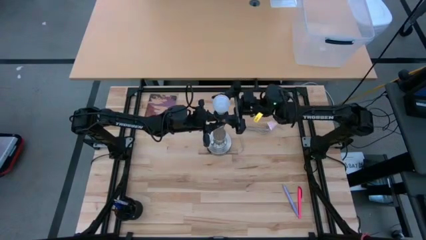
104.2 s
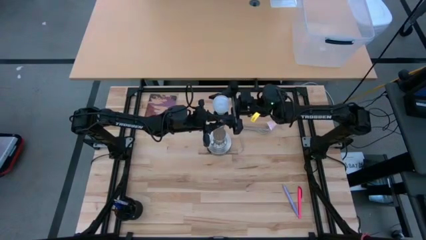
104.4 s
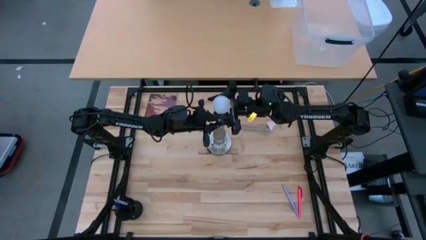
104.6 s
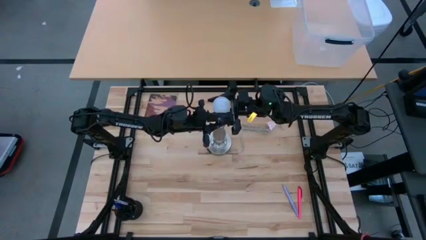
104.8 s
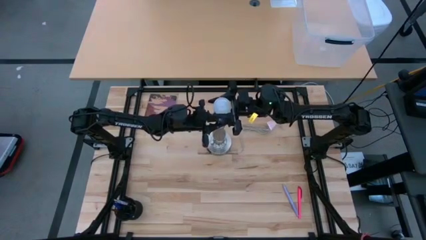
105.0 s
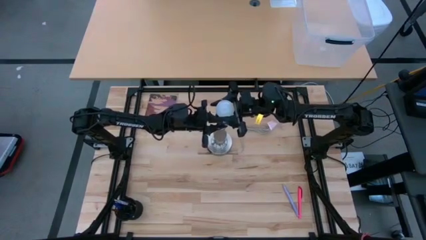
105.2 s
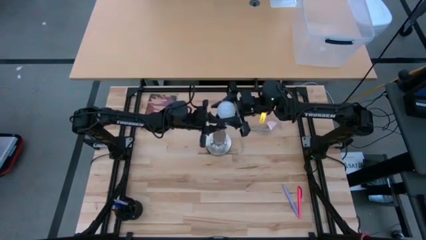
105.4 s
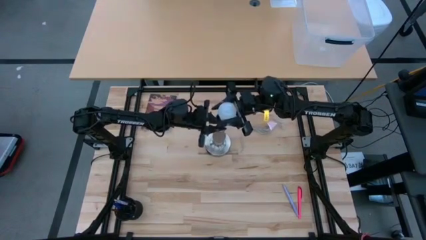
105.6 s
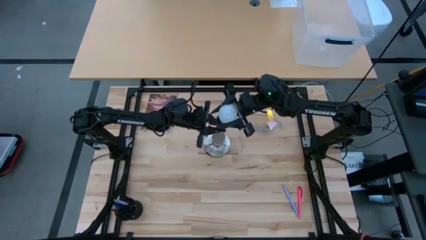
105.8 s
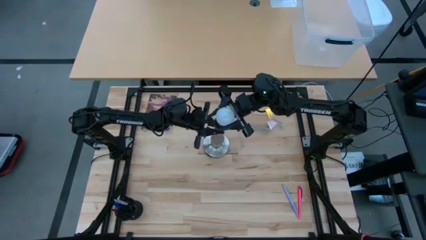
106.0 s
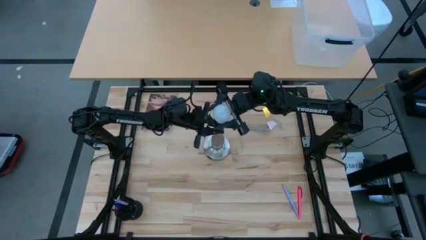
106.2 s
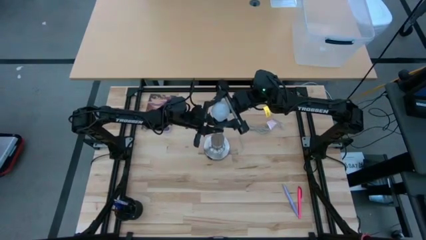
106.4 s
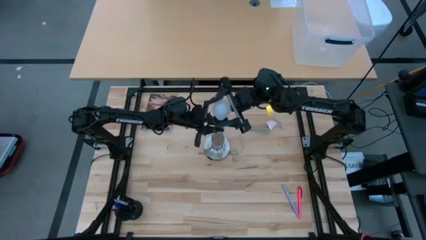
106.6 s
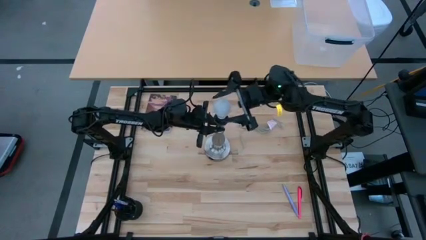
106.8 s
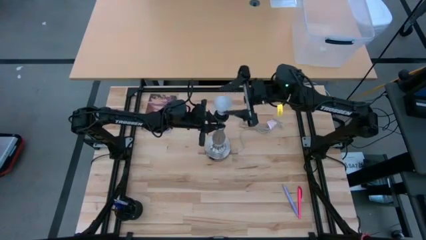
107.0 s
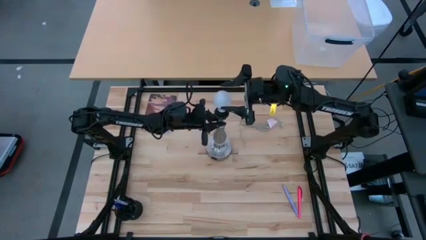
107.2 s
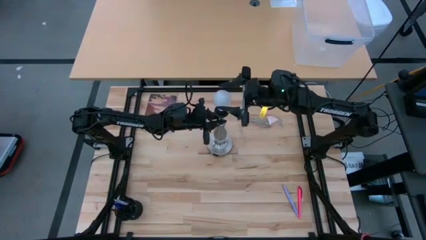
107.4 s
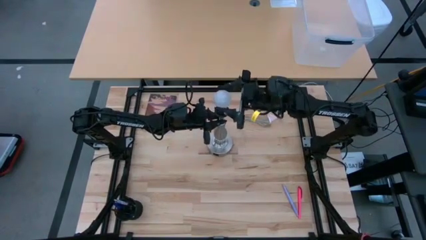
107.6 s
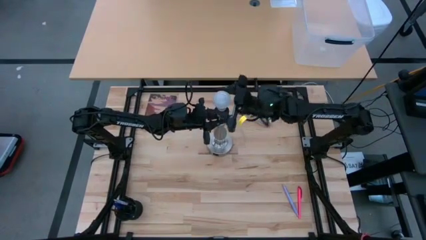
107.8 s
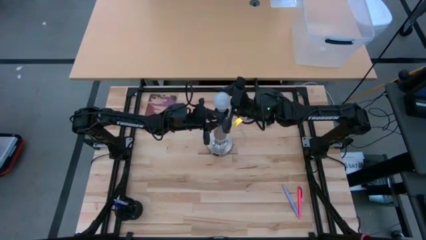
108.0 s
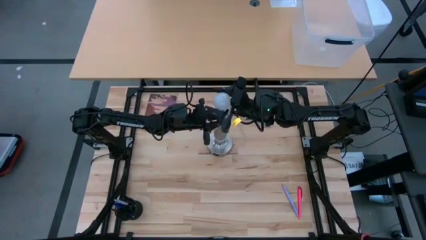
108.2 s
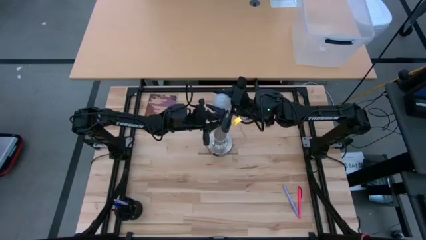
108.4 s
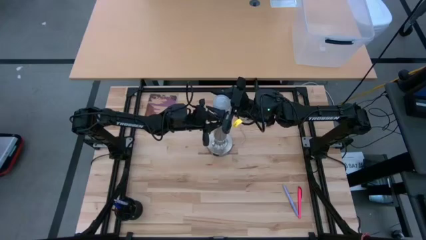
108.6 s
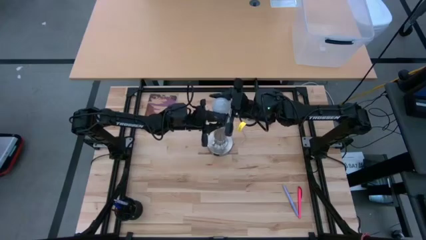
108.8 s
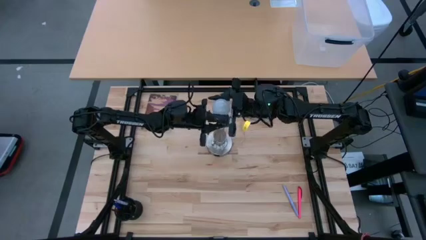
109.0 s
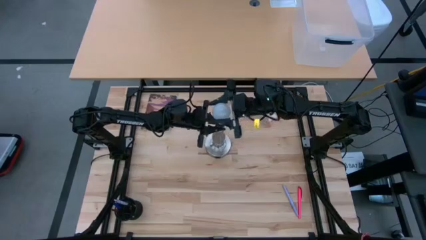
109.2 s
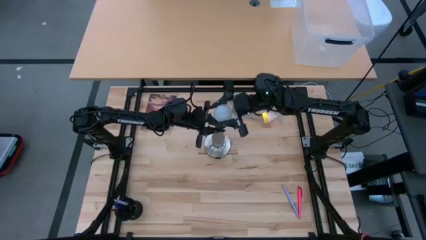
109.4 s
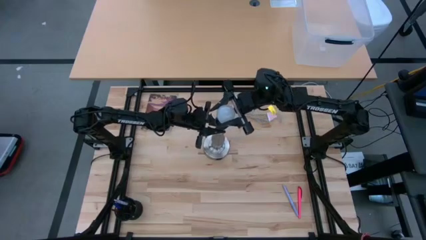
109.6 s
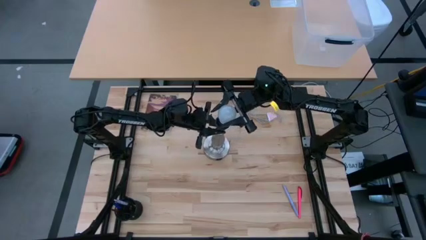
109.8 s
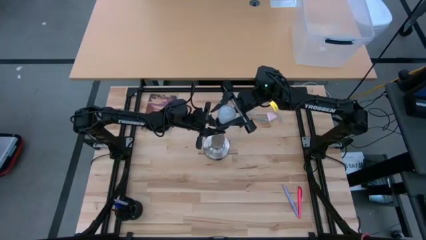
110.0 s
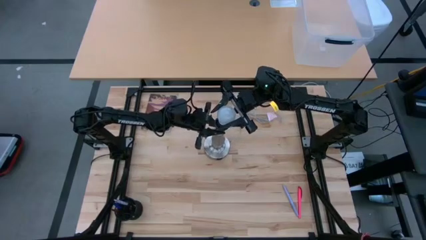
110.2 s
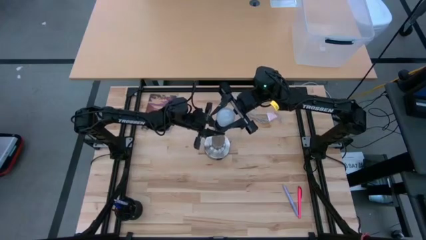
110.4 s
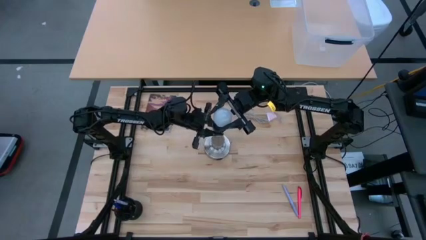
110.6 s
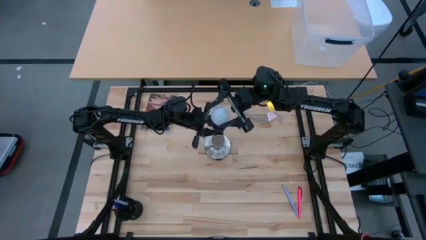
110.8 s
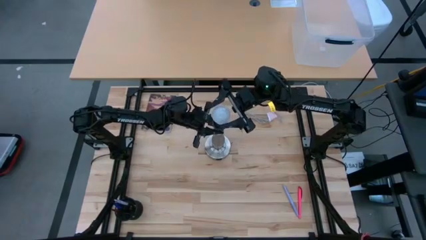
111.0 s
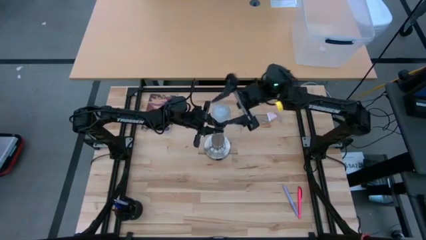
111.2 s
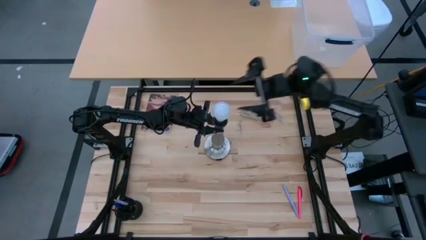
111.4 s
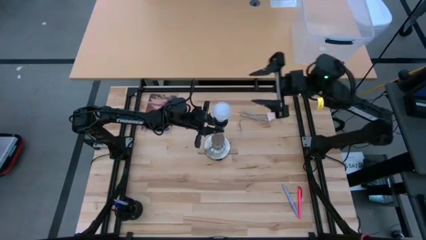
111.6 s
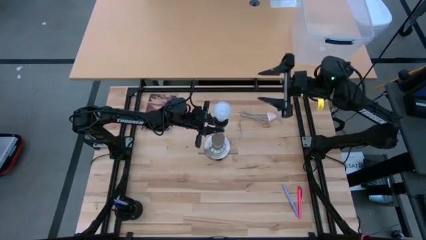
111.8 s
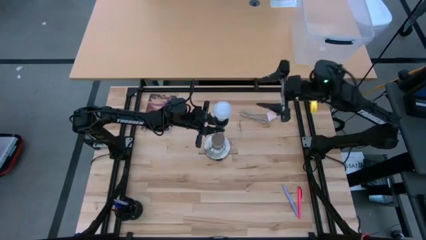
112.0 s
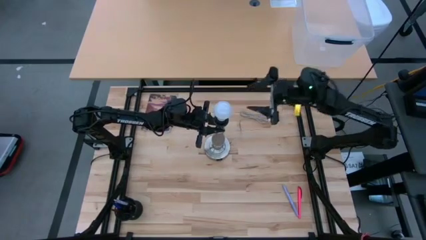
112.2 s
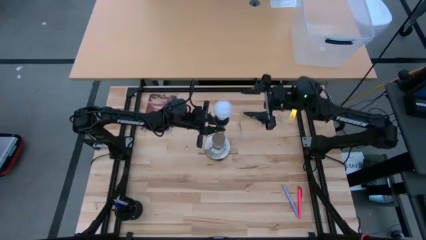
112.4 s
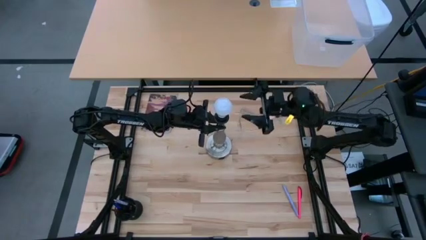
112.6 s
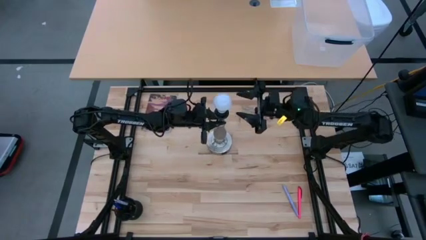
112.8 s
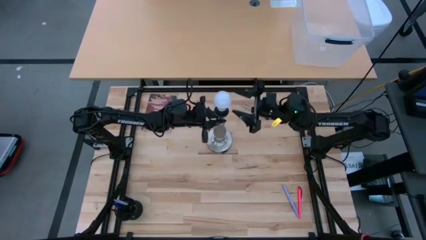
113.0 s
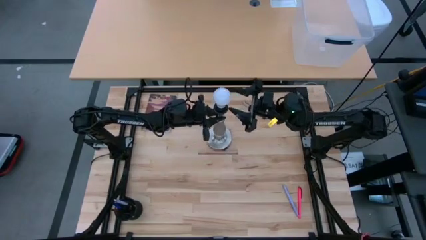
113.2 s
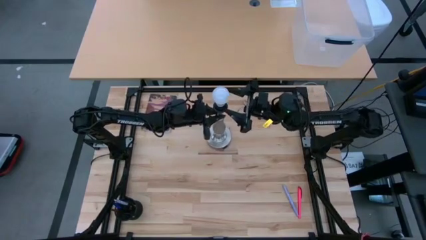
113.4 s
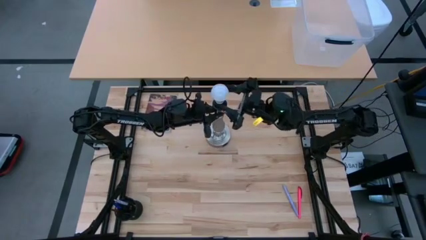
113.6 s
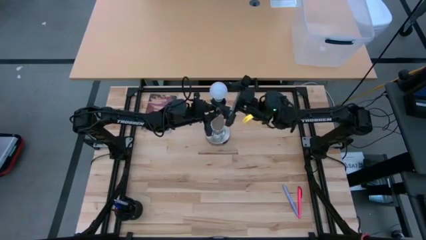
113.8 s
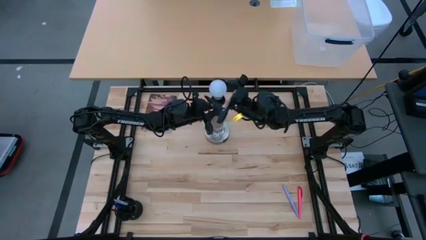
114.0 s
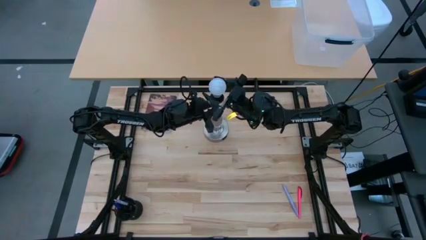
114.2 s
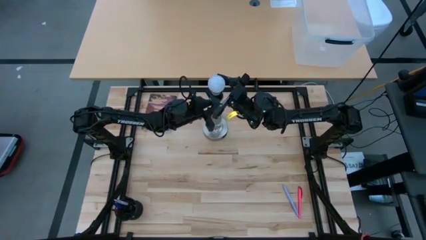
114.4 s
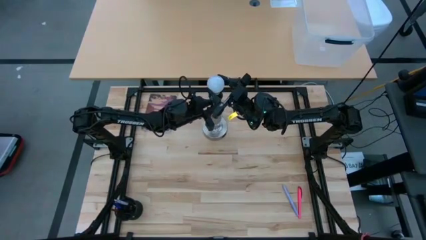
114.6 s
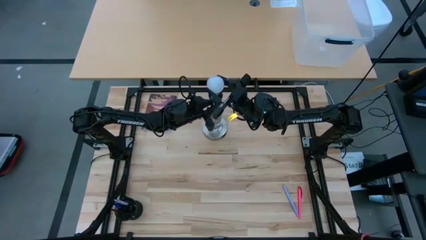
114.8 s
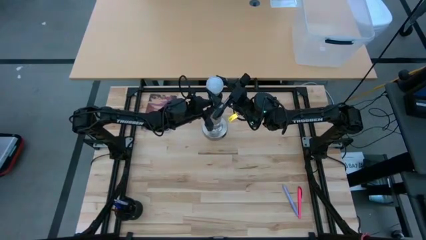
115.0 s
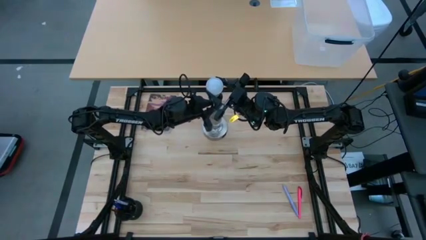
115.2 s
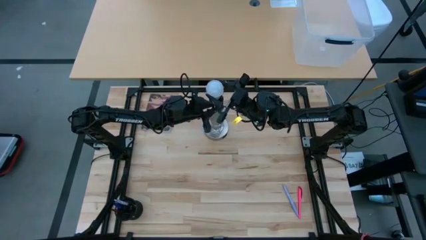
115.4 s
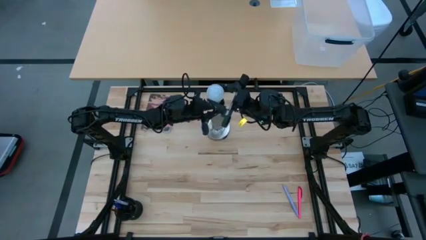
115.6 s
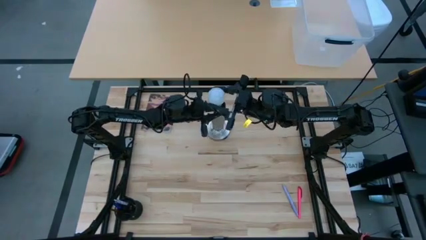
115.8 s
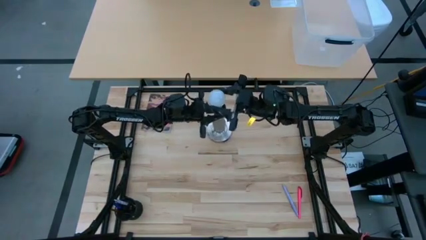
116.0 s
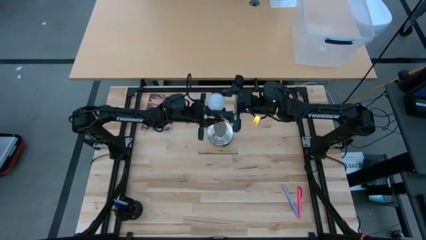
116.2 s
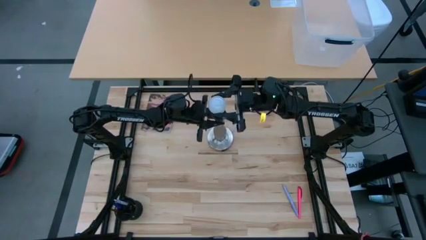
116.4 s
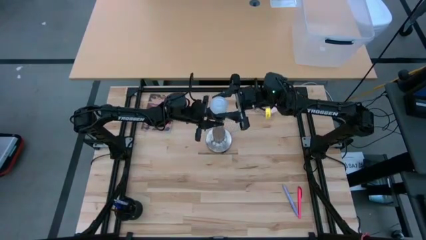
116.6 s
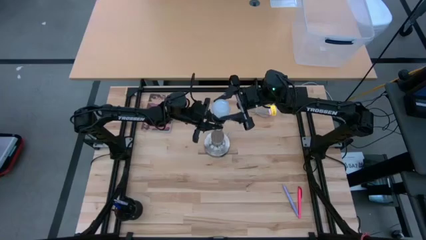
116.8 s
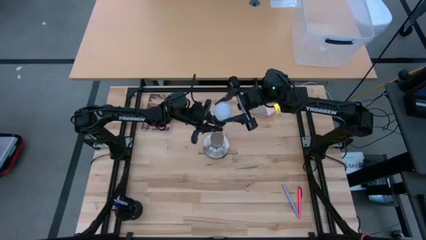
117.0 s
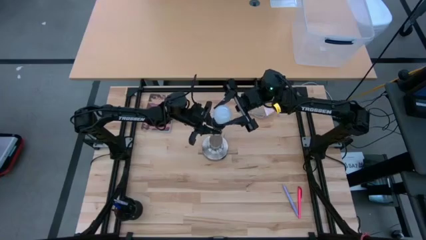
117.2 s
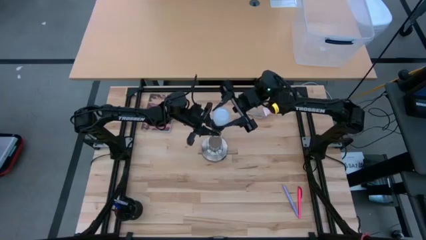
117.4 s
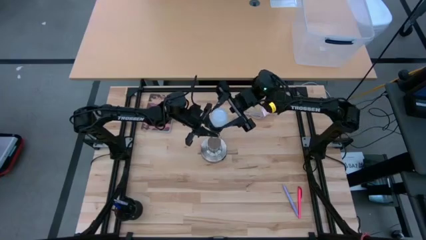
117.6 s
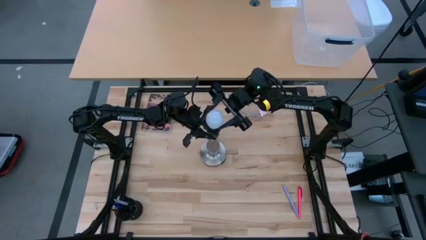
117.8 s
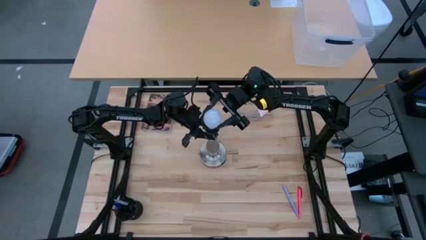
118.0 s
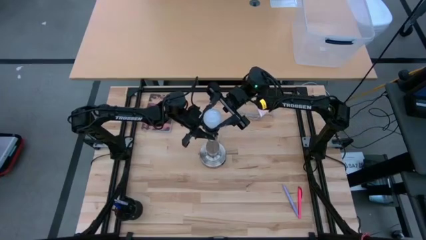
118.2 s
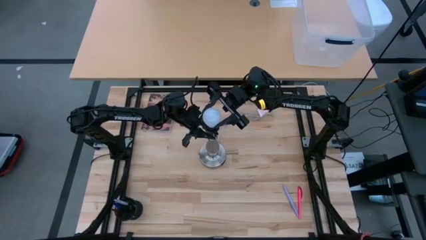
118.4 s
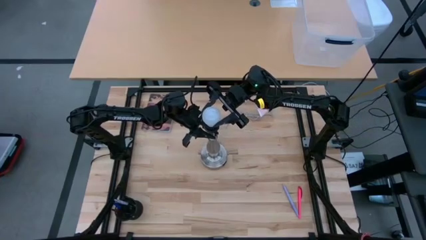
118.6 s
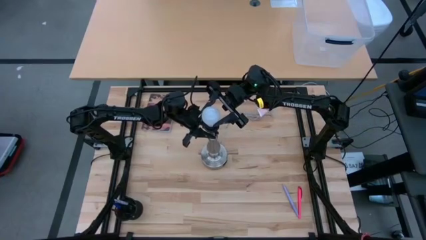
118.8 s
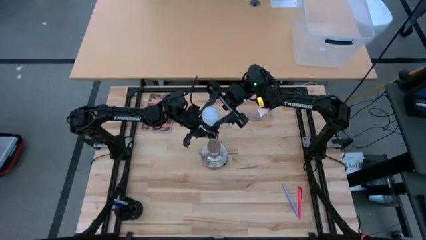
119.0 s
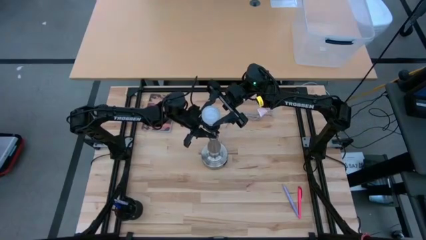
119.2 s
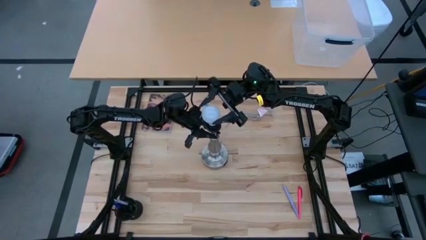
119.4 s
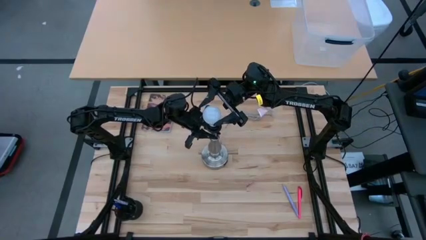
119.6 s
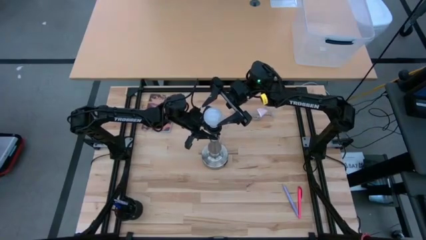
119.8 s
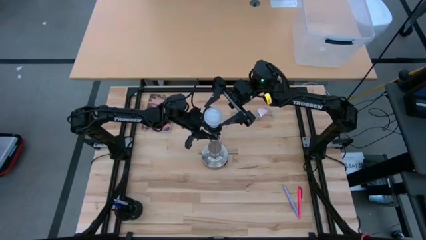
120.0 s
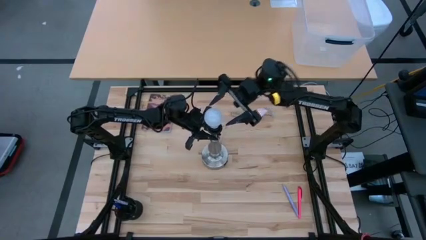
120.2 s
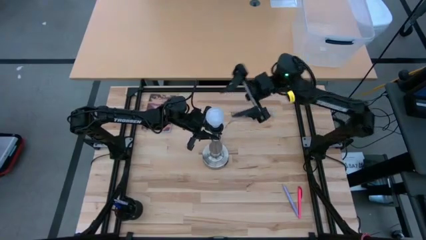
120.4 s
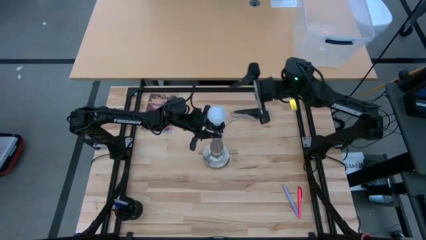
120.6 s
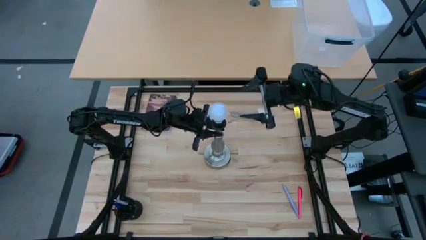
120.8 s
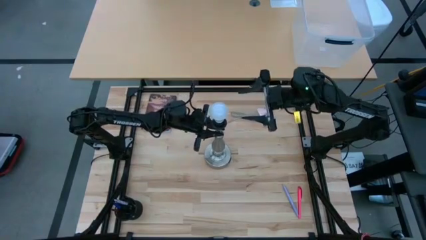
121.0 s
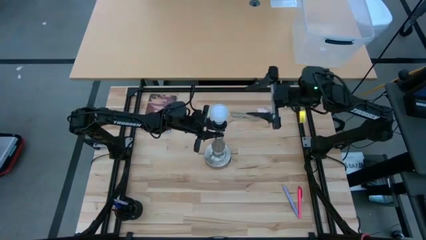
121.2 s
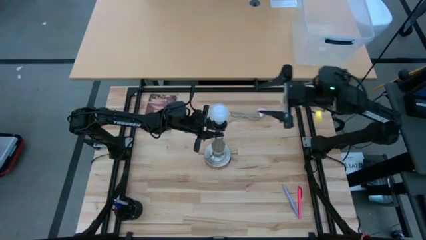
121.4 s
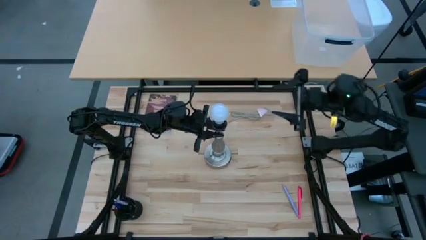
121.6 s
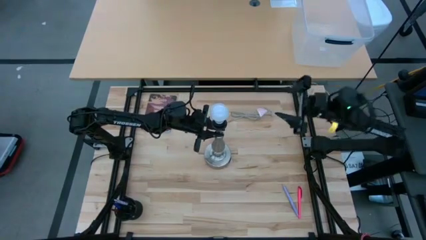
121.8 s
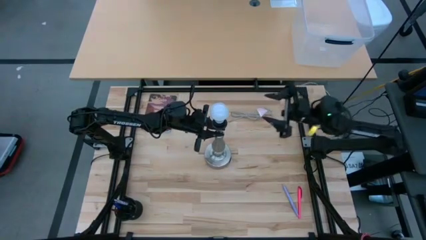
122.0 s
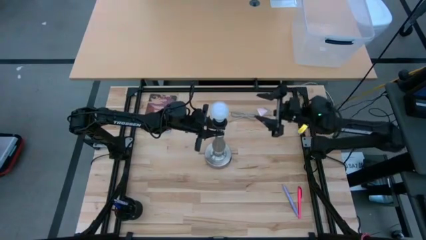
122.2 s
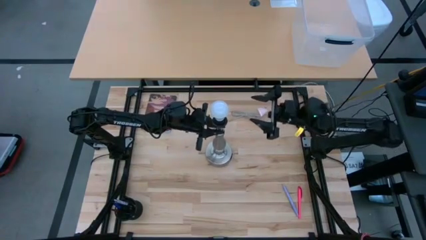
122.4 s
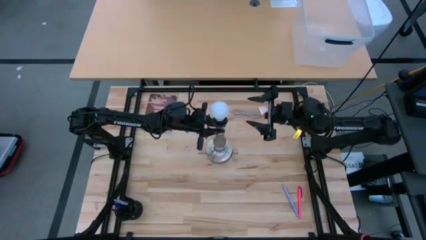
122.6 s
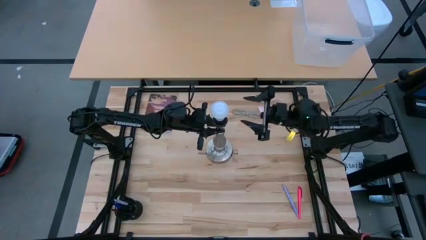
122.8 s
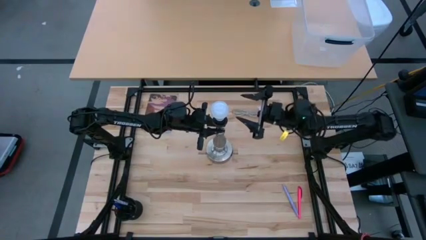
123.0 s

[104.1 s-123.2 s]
Task: Screw lightbulb
Remove the lightbulb from the lamp
